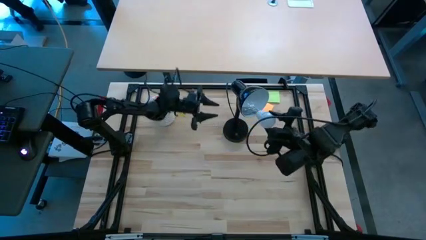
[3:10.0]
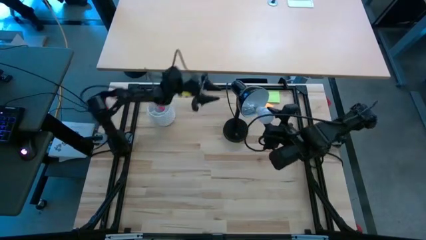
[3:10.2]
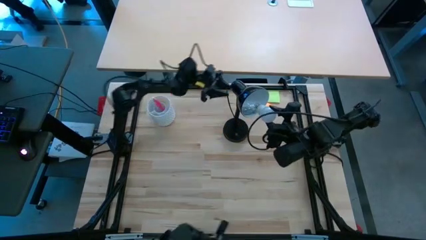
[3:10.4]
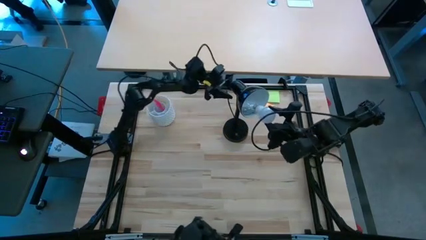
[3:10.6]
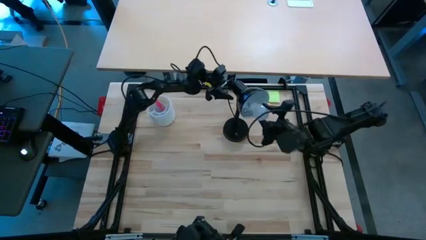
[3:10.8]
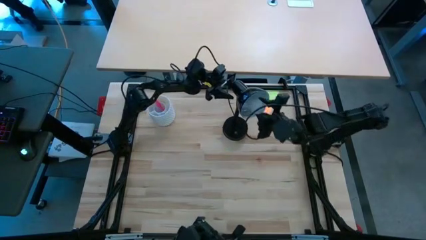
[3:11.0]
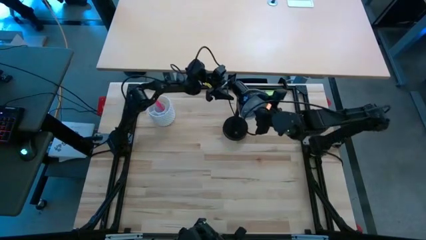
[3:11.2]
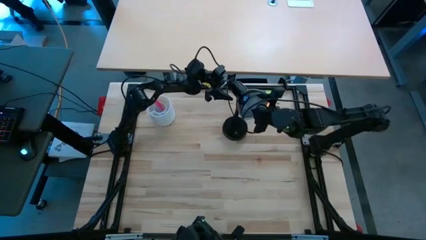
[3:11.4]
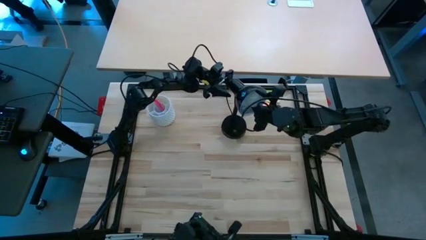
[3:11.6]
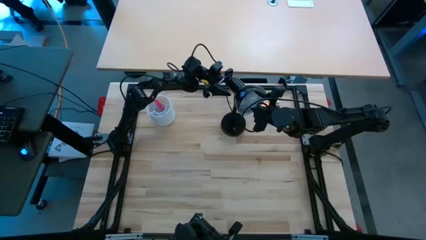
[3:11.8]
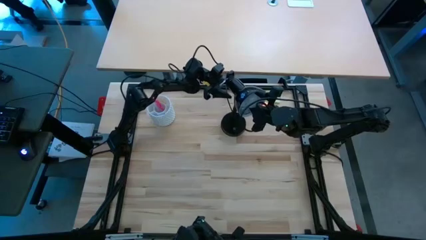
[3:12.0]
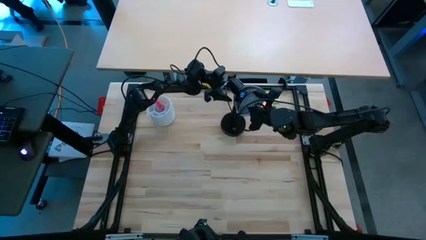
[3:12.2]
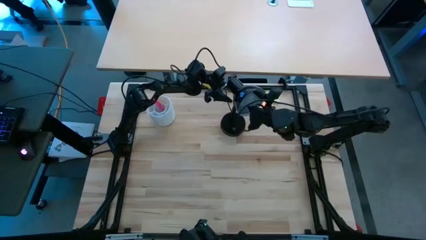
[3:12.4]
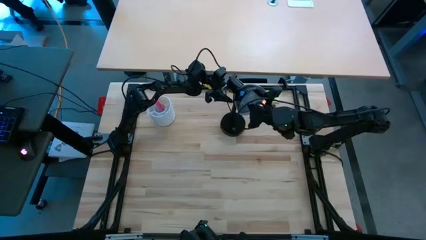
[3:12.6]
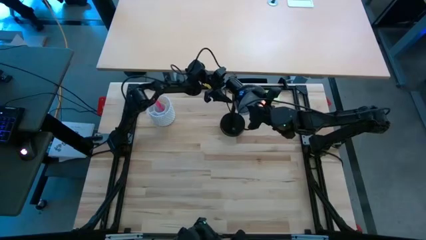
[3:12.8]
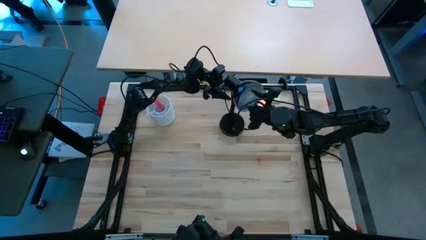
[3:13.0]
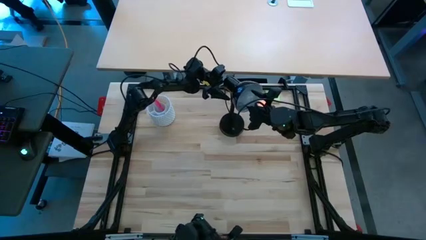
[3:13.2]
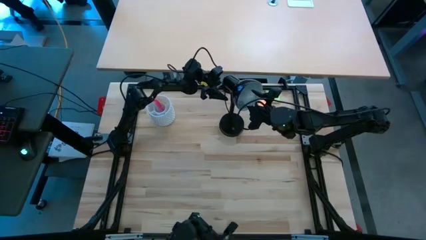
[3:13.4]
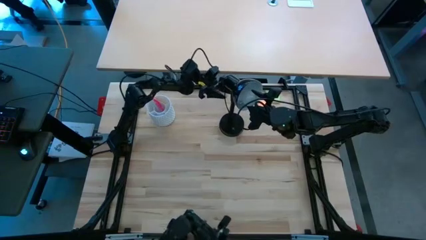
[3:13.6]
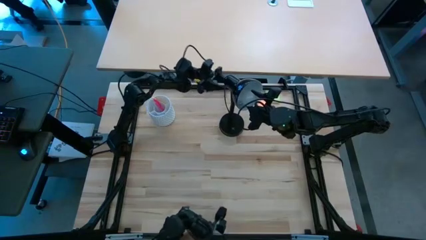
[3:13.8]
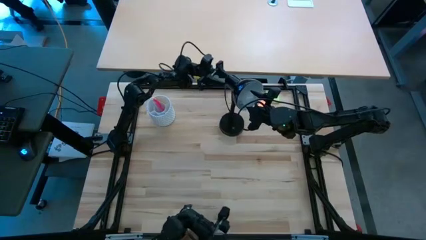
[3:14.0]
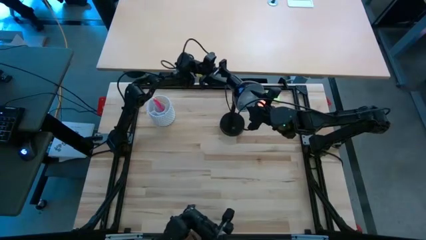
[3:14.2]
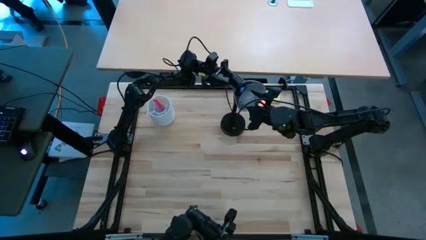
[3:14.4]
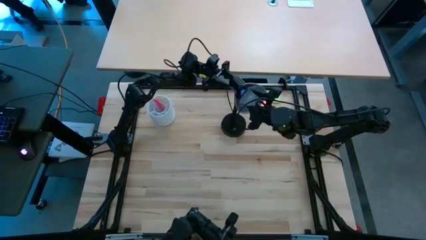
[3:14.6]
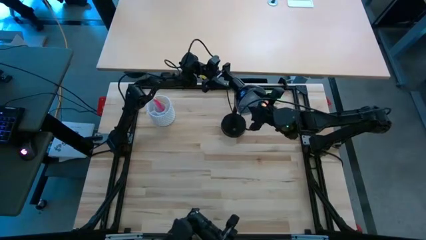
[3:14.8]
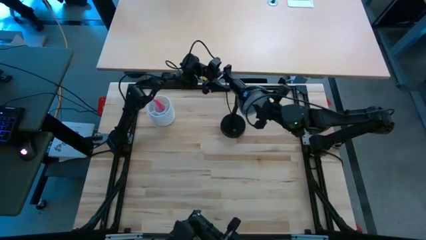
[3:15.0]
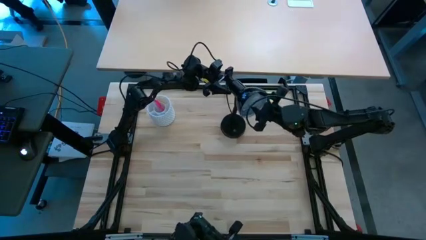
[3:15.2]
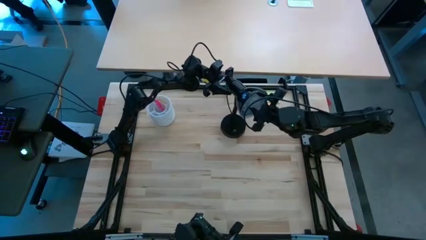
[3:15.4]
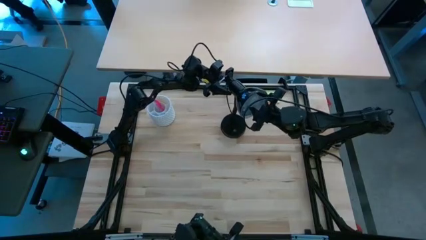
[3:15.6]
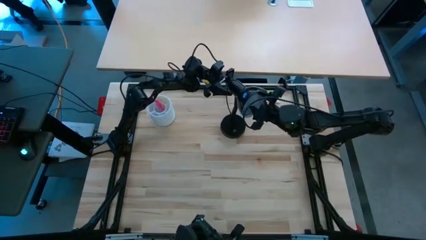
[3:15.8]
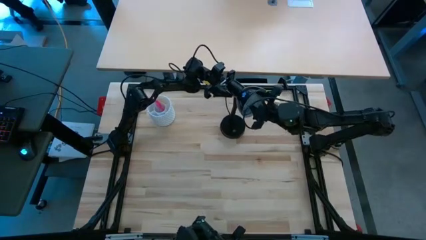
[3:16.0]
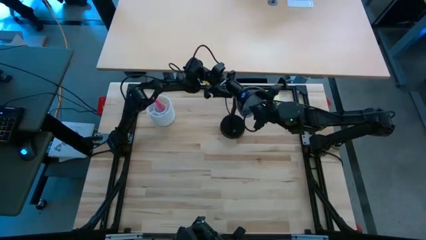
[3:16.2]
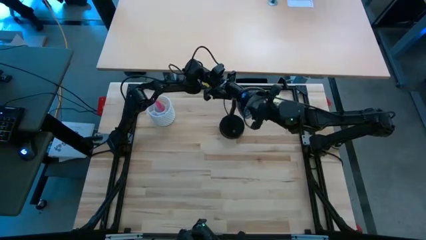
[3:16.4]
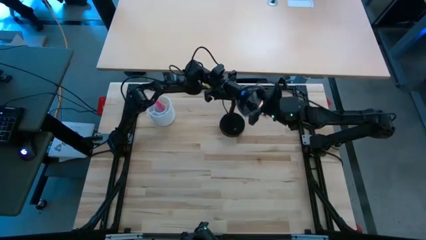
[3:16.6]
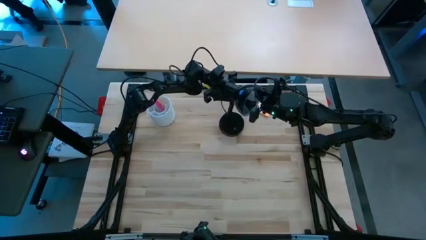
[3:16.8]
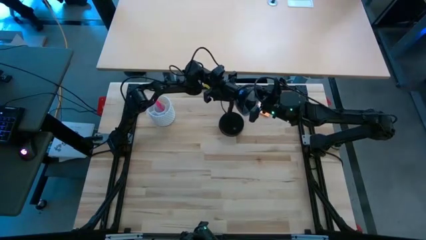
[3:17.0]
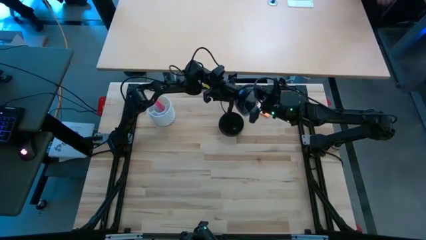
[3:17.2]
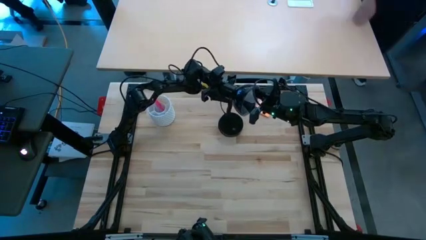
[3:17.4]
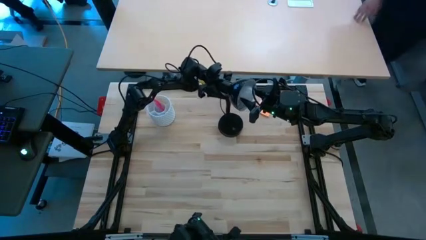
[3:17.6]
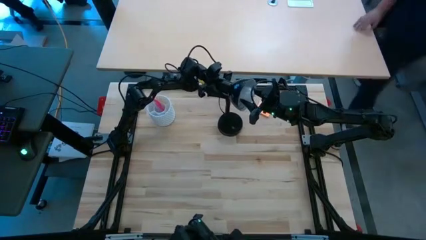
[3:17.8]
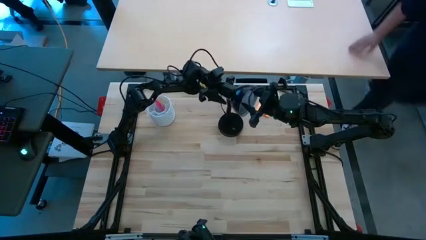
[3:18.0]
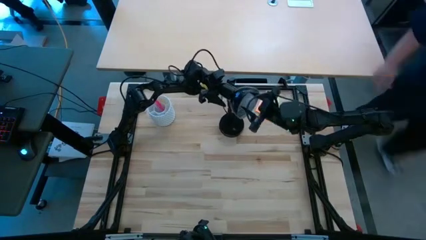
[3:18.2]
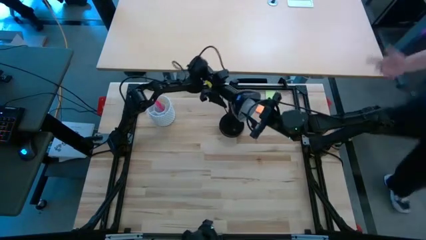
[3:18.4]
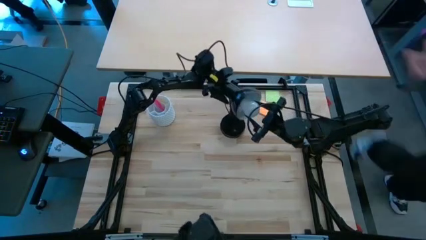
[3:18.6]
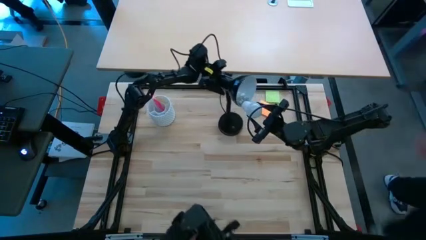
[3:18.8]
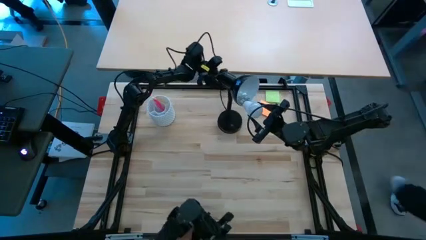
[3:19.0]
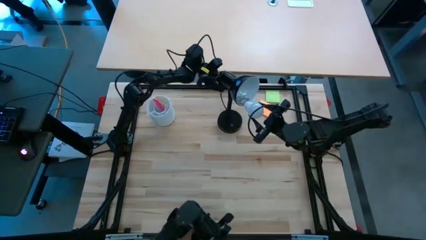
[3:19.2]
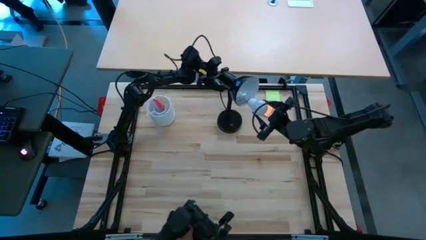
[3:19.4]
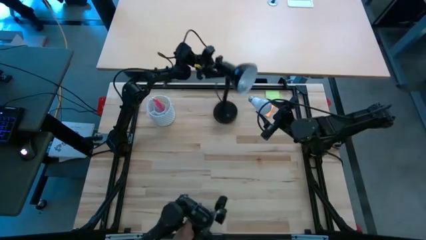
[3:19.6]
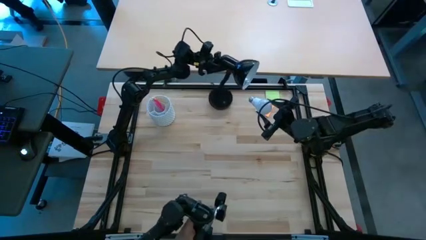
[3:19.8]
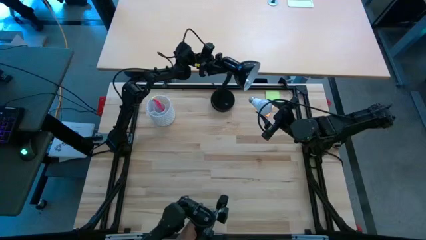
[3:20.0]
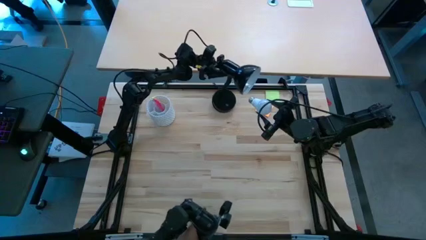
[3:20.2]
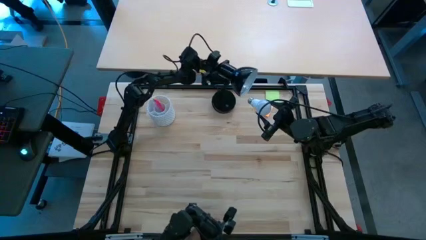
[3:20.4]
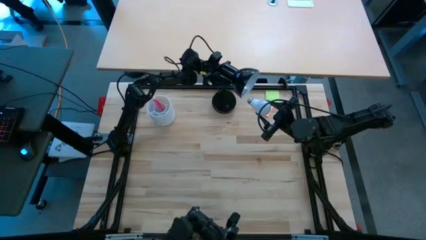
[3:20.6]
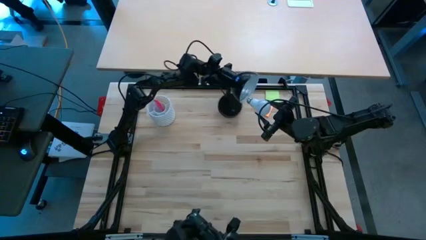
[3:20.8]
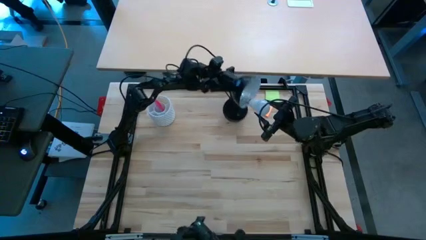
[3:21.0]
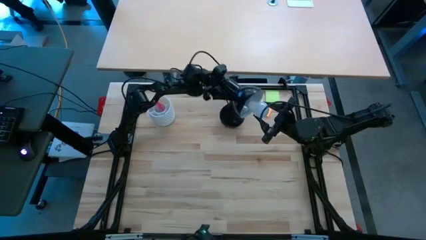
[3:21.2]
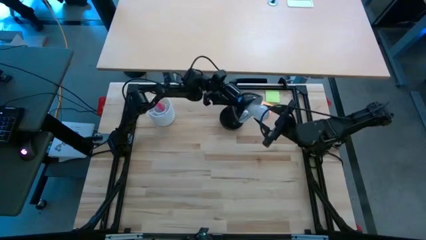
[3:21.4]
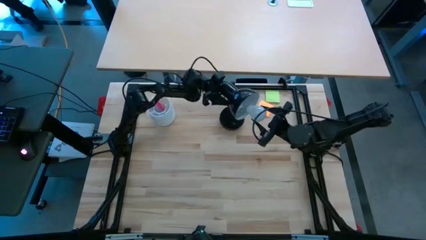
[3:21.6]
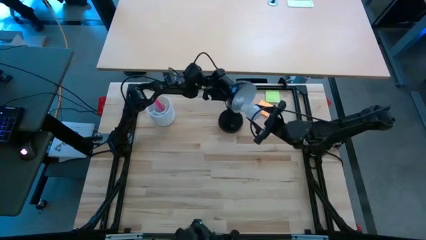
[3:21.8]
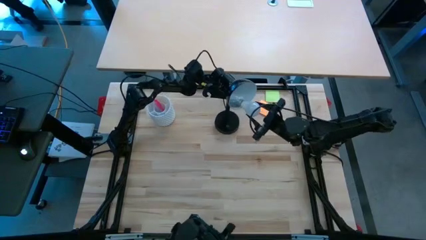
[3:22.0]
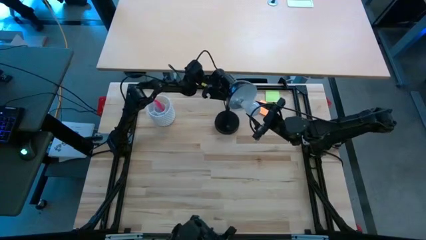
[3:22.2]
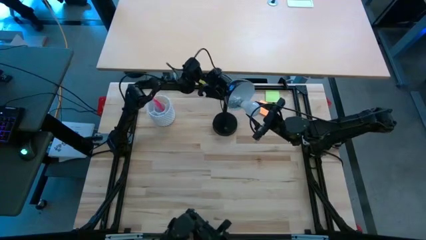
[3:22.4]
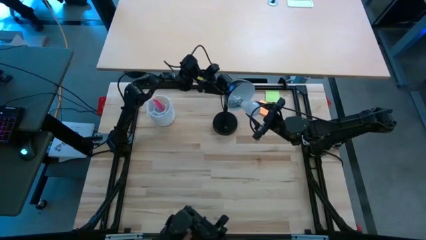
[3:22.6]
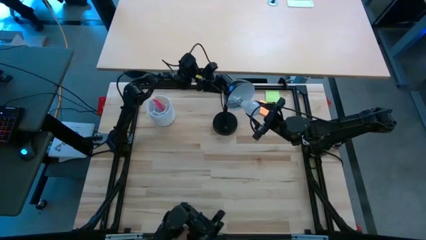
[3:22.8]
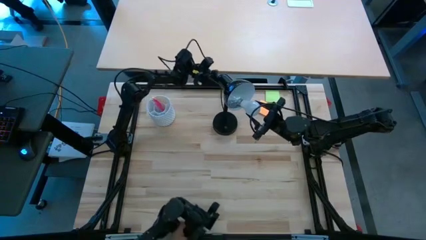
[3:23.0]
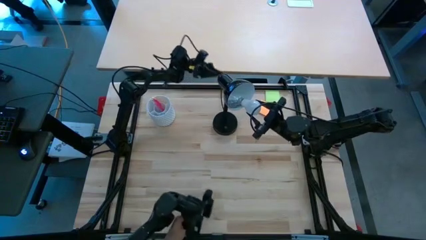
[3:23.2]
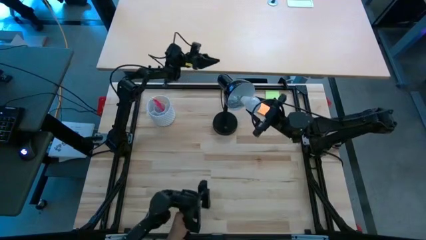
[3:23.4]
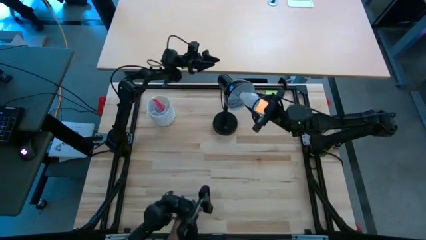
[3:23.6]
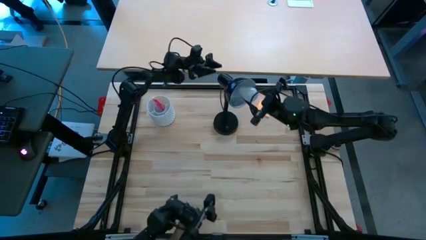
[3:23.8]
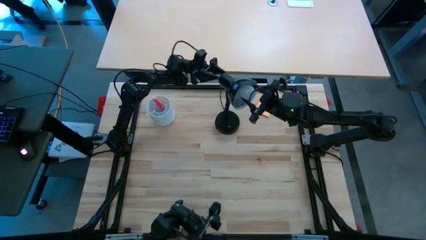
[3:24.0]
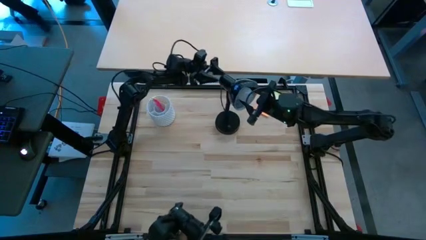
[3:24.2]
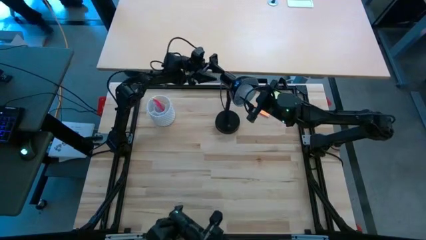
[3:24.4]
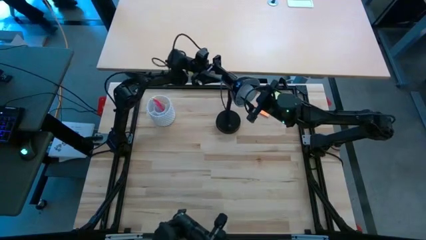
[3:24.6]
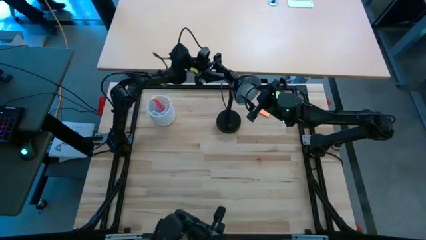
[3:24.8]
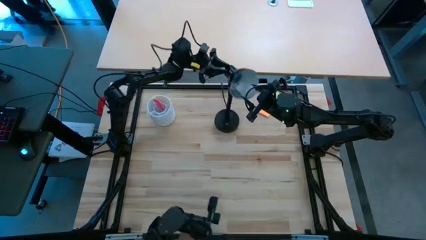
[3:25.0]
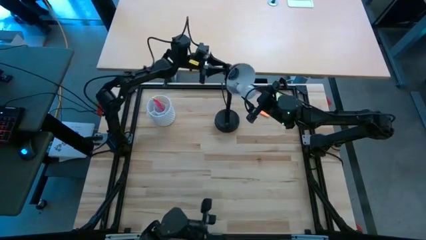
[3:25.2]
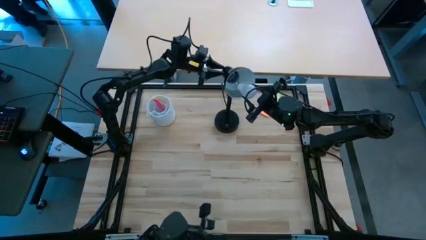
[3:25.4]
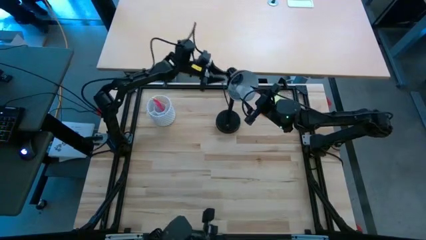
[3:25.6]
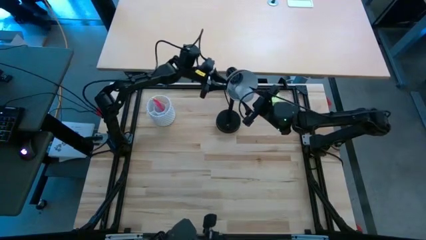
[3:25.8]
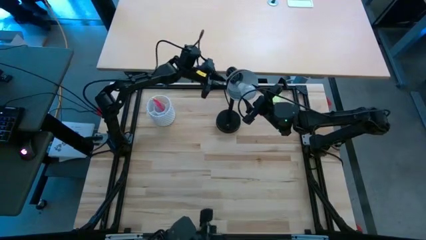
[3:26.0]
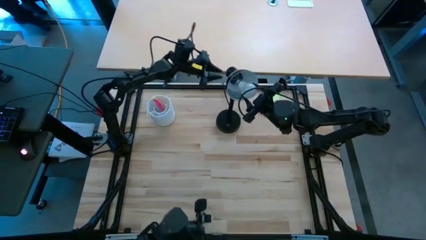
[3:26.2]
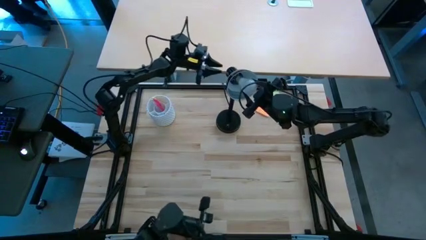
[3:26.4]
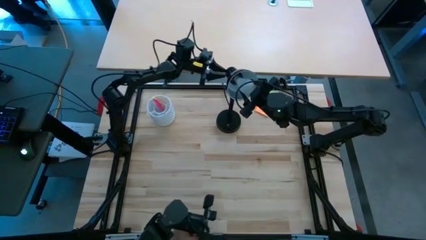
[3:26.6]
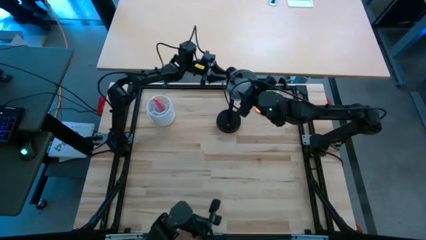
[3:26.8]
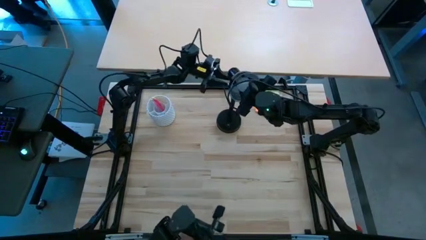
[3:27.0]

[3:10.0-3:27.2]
Task: Screw lightbulb
Insert the light bulb into the desk lamp
